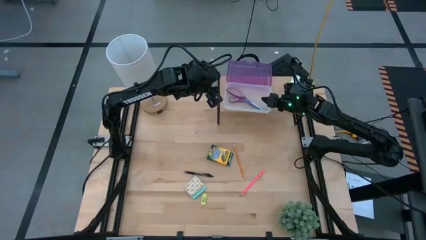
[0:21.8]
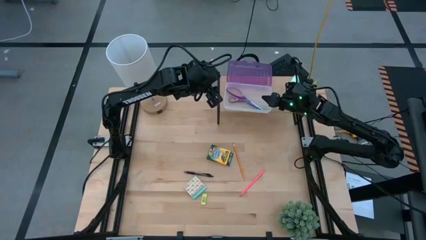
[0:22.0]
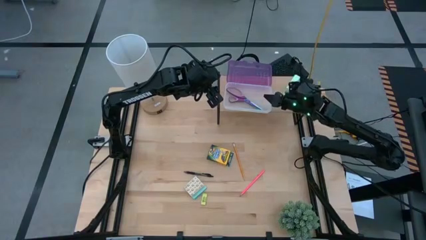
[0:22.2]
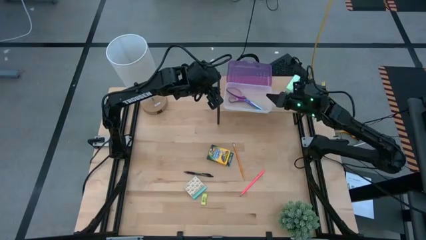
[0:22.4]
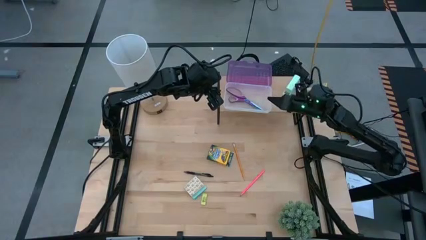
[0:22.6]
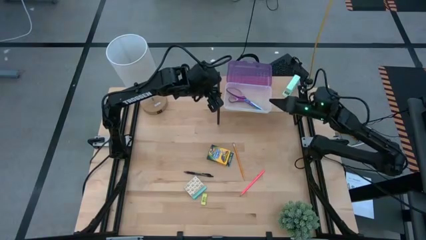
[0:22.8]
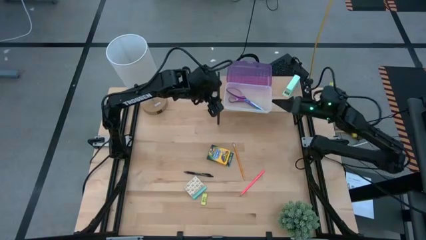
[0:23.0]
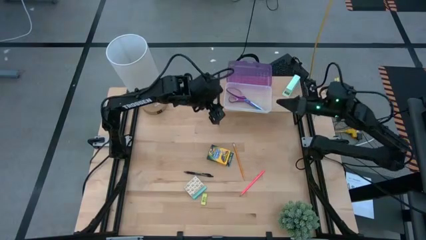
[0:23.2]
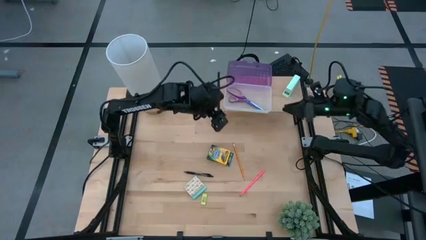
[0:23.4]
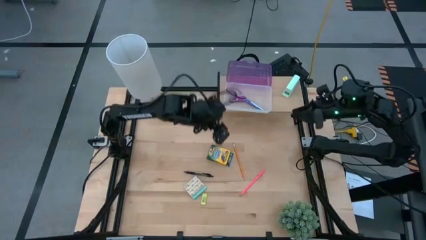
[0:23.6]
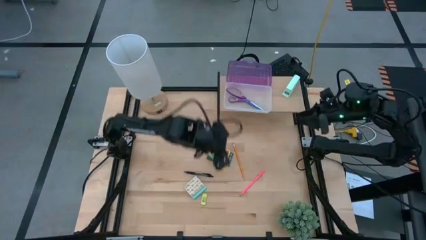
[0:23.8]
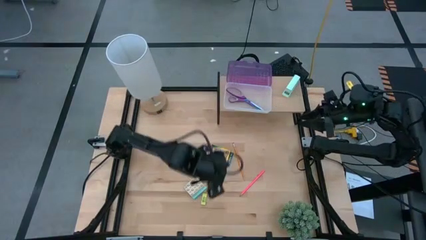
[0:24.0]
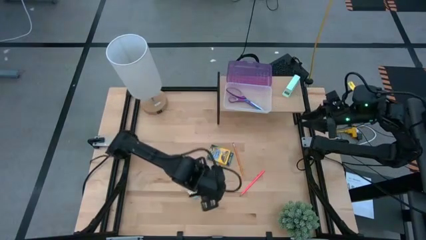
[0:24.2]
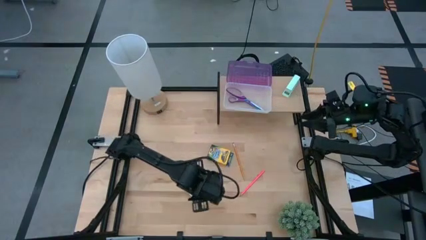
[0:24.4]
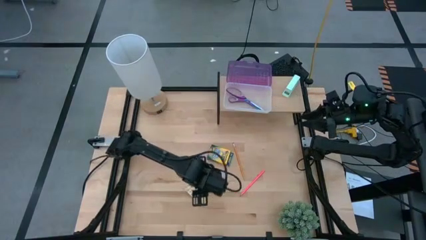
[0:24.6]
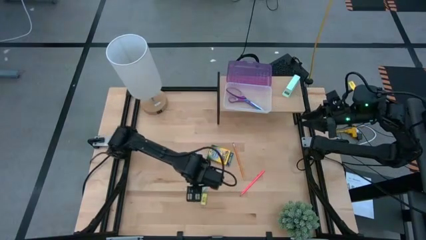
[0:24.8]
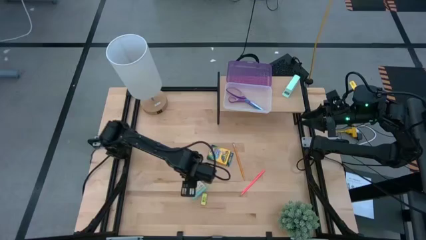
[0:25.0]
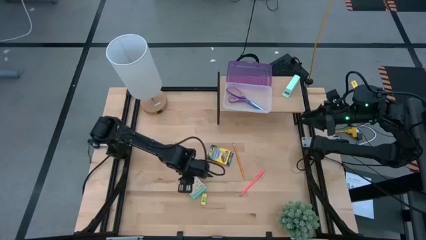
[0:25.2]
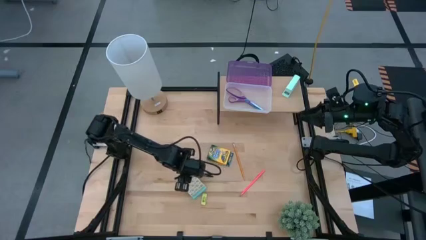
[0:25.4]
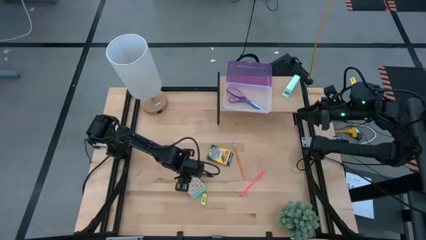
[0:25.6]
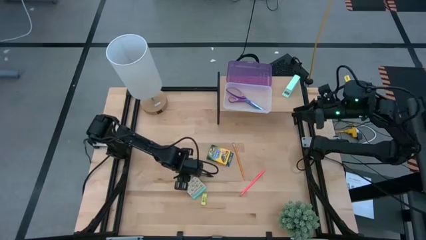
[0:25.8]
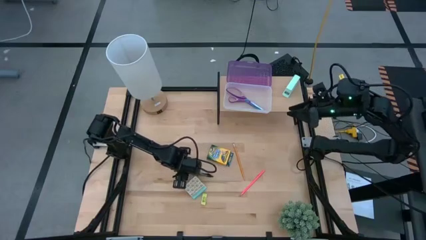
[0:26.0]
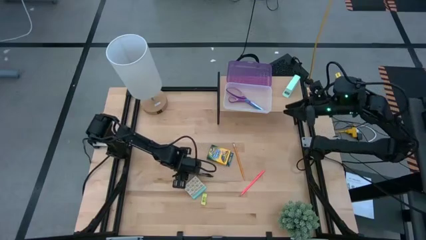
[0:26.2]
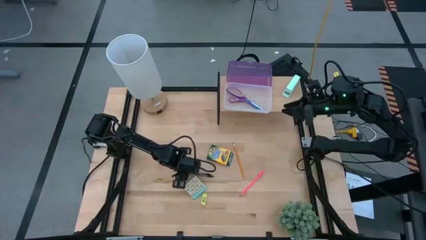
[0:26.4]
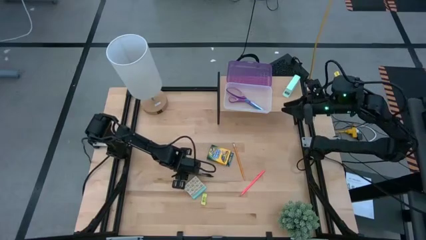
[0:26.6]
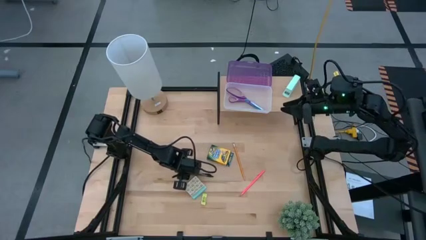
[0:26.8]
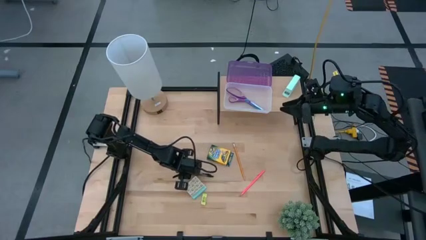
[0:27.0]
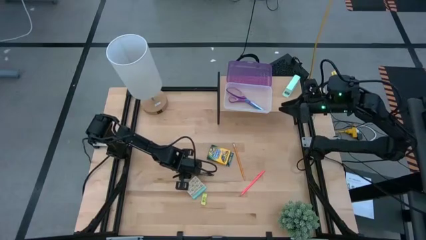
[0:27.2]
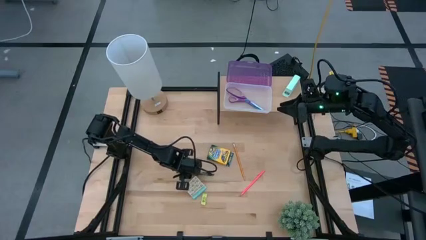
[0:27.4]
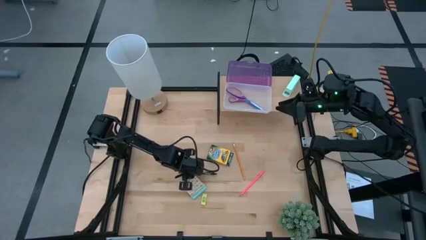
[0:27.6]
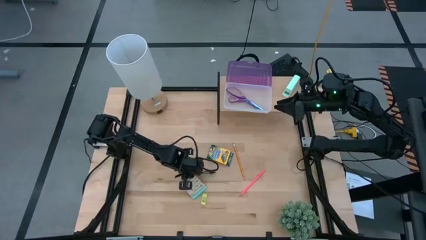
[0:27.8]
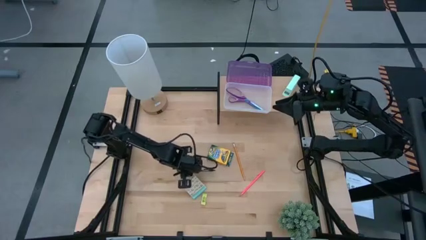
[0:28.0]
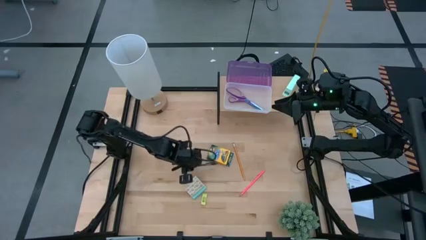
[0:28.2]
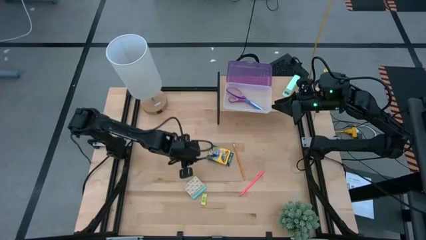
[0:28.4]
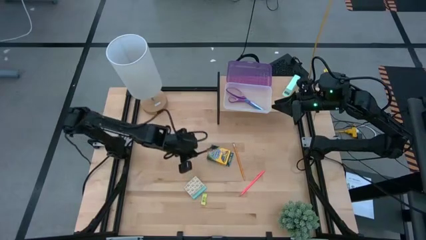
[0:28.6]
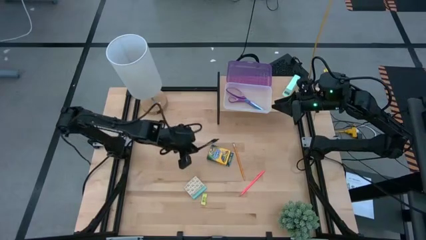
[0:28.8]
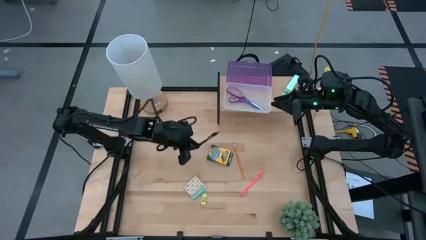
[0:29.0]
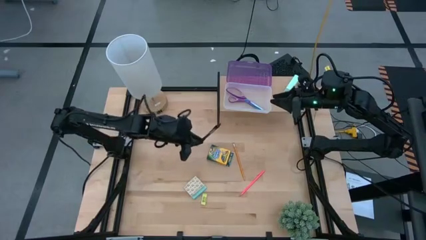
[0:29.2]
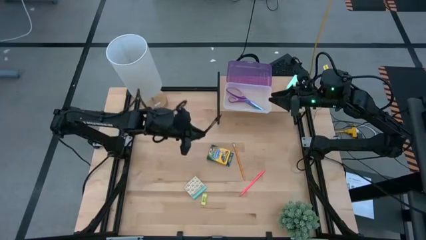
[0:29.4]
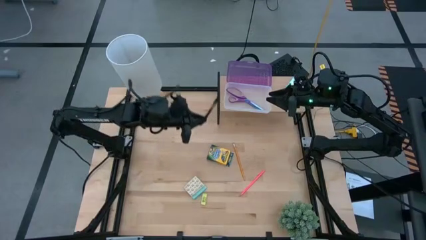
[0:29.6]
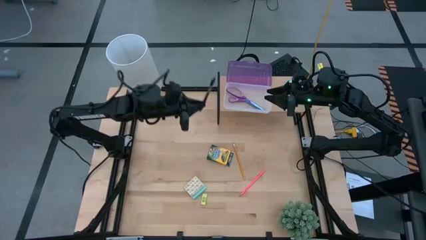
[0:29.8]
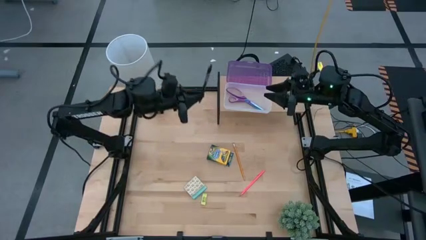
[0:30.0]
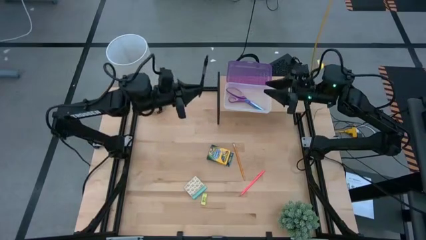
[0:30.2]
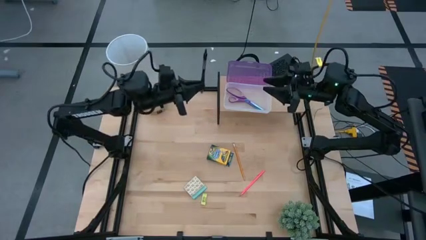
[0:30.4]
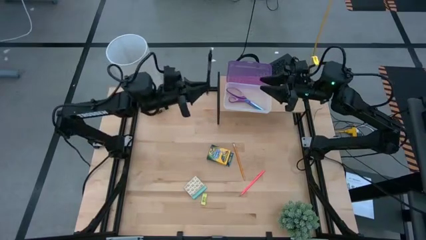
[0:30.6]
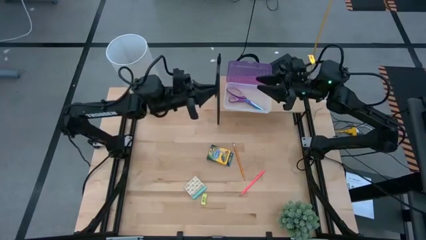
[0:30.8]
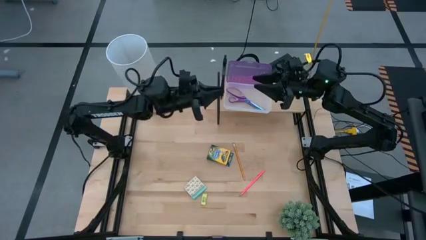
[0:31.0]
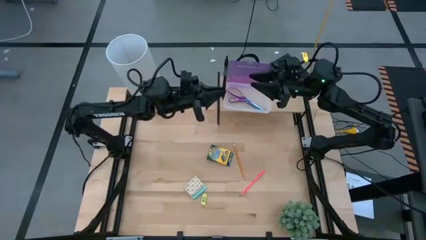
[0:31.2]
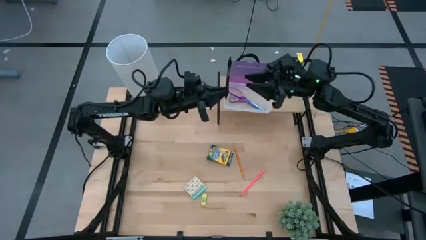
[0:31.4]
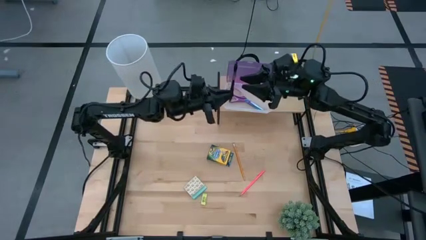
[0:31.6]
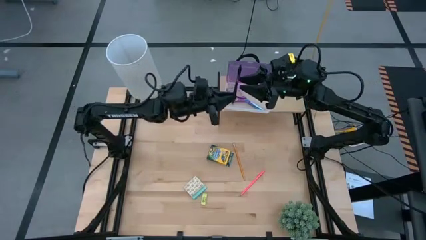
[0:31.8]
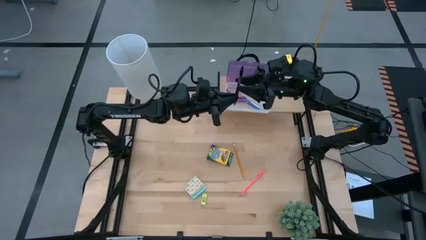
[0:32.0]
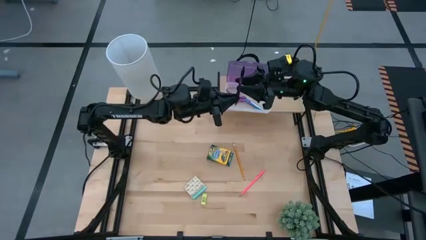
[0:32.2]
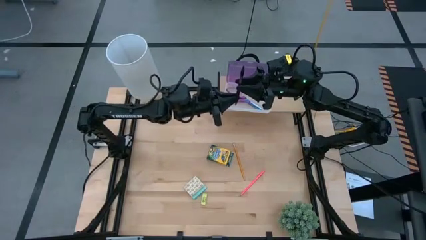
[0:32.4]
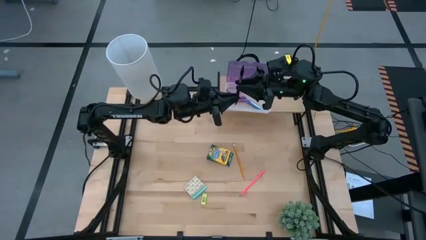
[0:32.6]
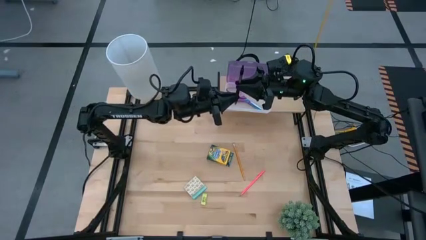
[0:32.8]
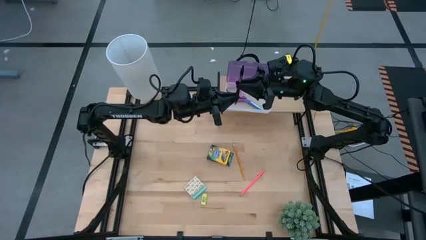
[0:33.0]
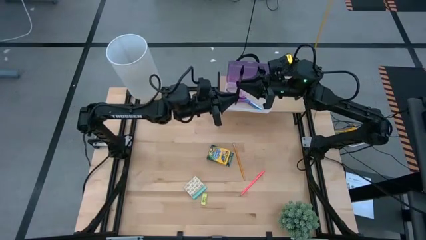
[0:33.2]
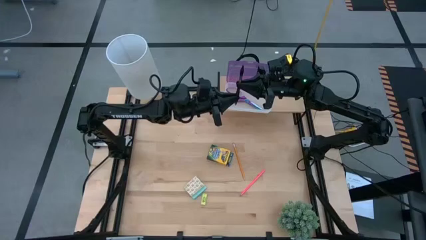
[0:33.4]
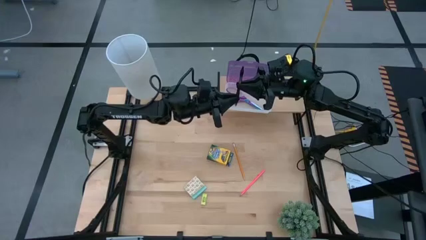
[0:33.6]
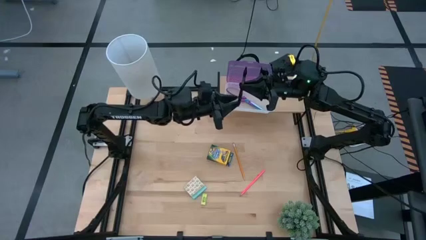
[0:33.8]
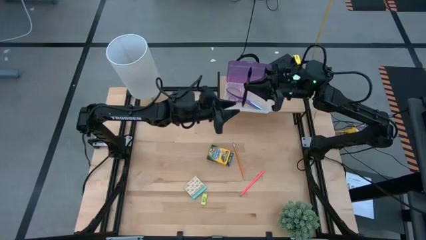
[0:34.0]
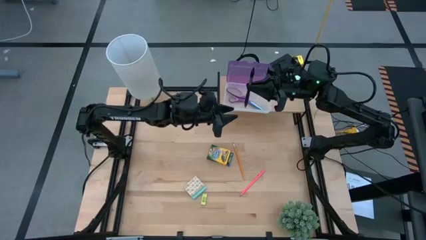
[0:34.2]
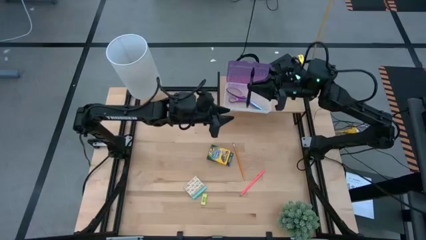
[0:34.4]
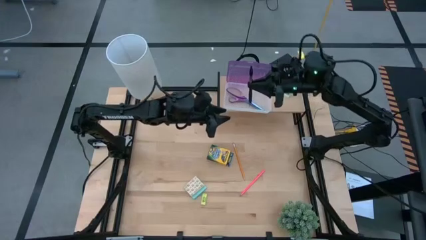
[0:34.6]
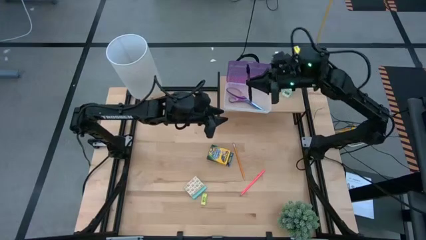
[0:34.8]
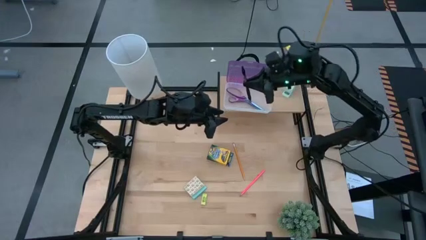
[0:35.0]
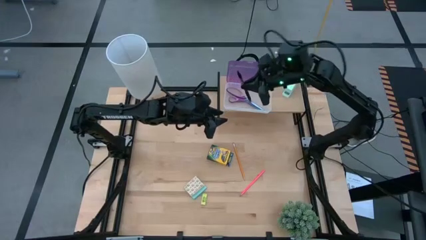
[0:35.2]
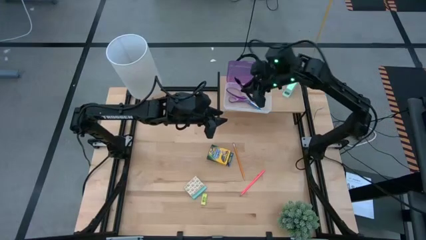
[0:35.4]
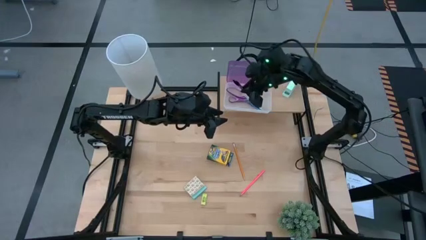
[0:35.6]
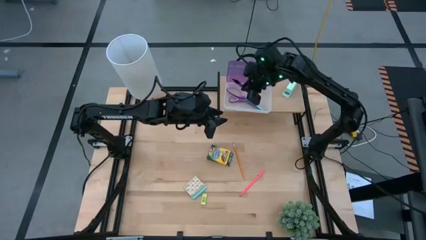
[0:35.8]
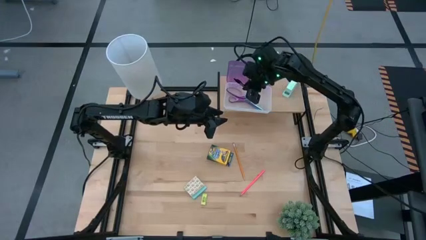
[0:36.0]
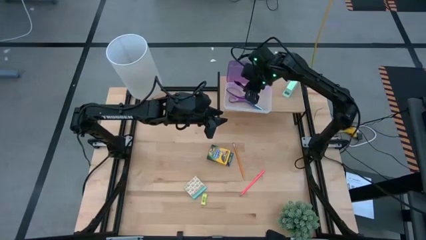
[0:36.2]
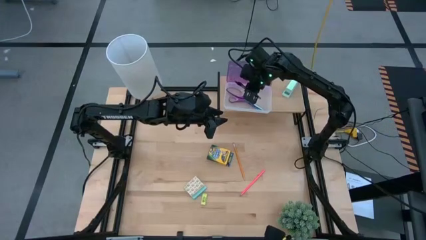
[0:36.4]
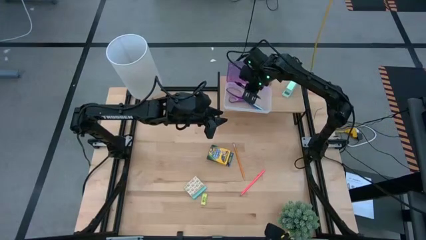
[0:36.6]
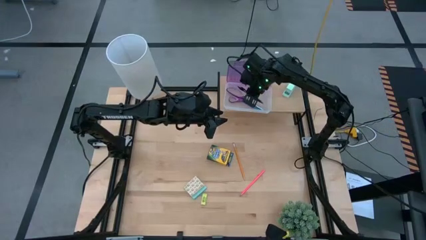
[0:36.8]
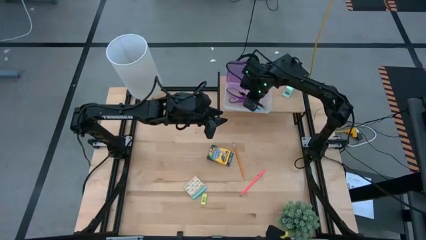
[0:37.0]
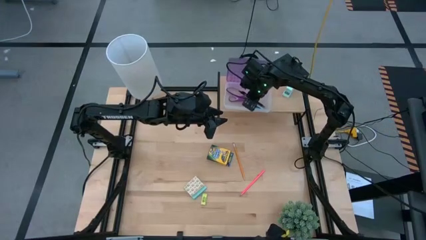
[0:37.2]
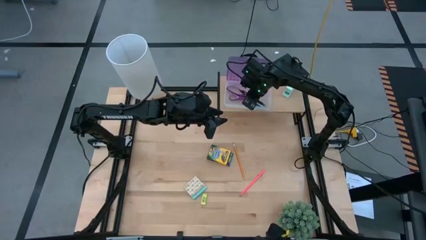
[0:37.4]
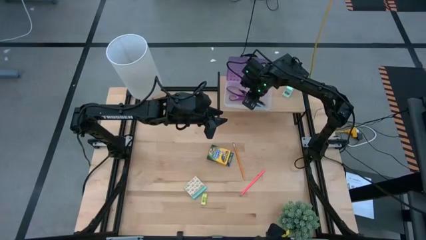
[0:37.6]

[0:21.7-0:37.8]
Task: Pick & place school supplies into a supply box
Put the black pen into the purple supply box on the shelf

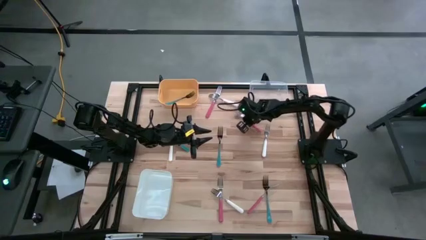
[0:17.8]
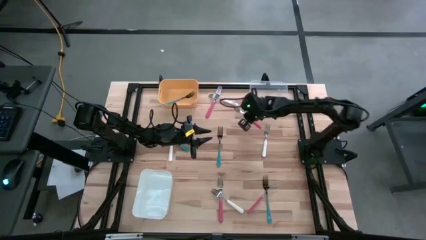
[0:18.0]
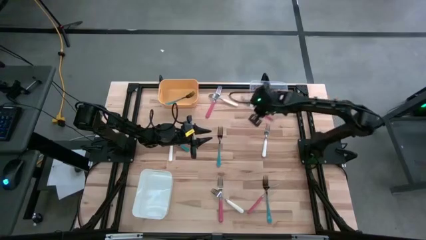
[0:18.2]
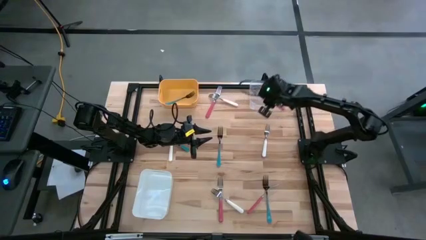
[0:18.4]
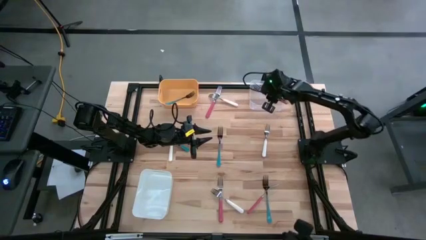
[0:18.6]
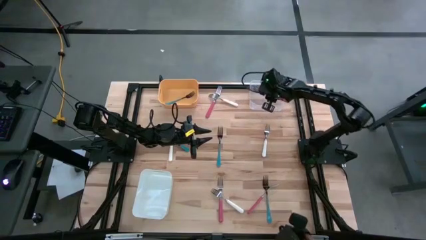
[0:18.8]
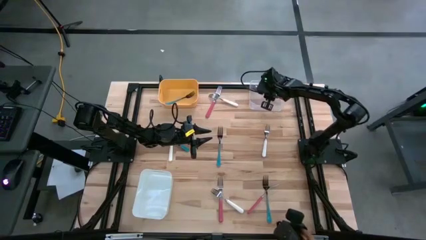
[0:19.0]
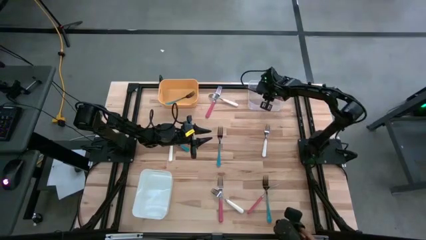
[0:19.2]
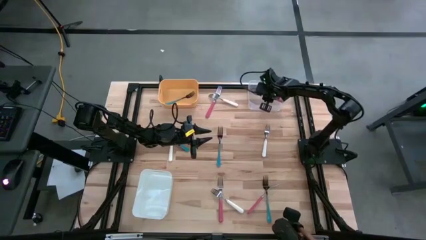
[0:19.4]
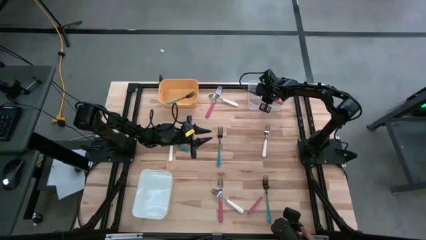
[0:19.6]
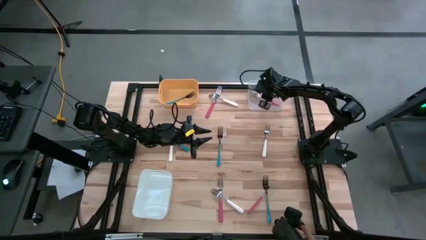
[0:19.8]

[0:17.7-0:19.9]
Task: Sort silverware by color (type)
Put the pink fork into the transparent bin
